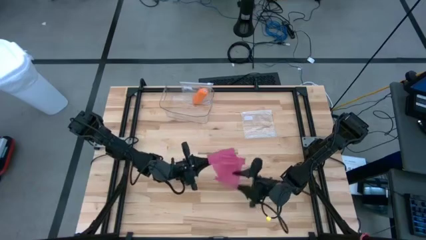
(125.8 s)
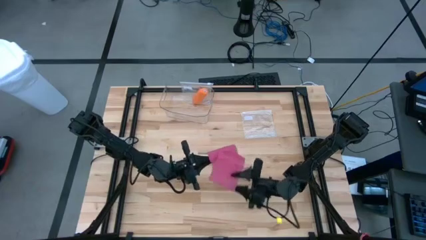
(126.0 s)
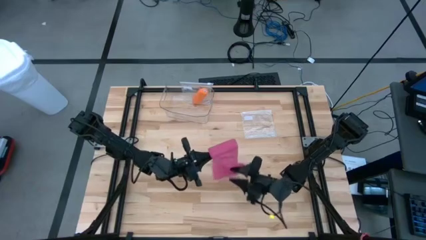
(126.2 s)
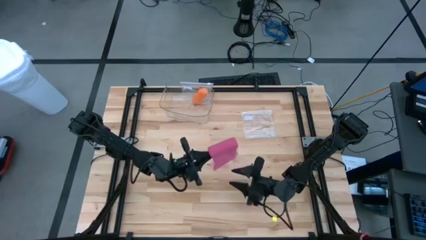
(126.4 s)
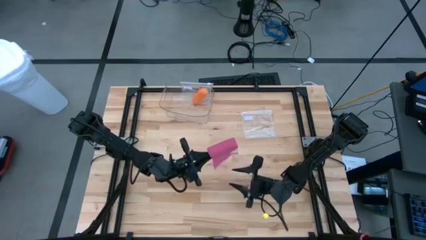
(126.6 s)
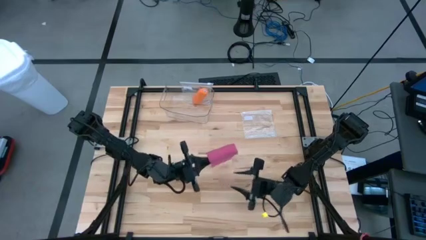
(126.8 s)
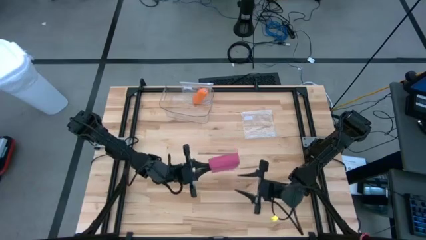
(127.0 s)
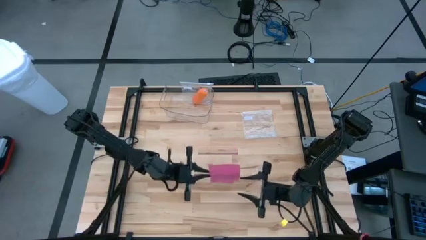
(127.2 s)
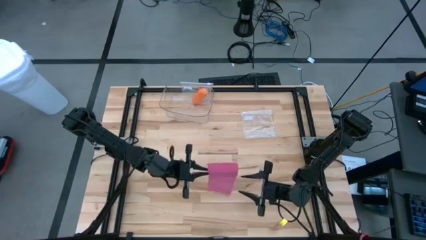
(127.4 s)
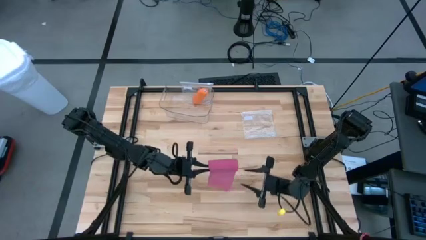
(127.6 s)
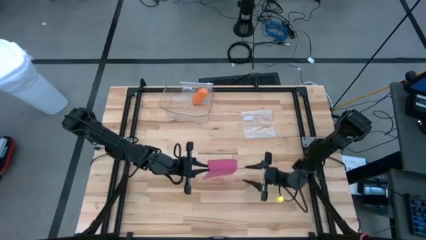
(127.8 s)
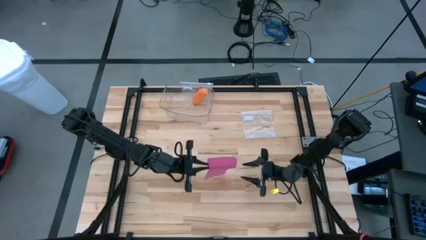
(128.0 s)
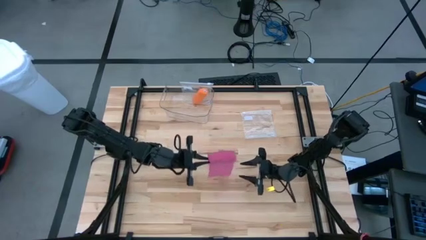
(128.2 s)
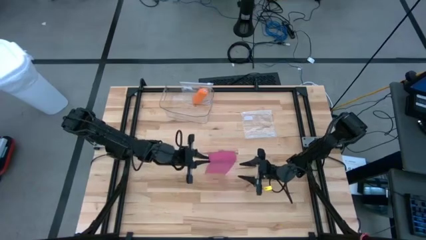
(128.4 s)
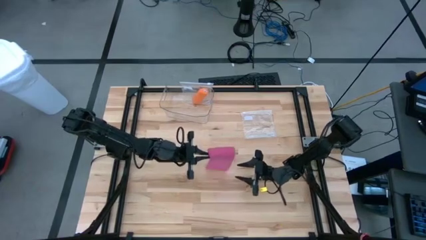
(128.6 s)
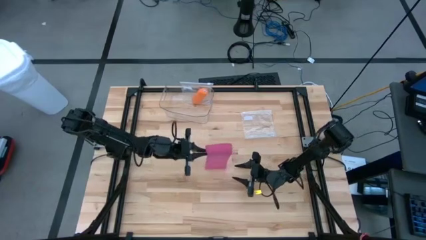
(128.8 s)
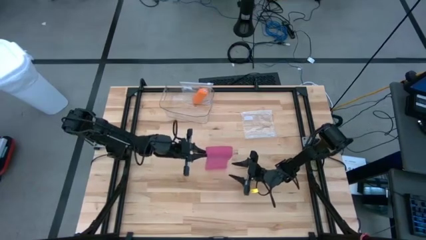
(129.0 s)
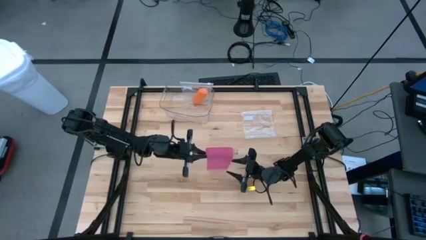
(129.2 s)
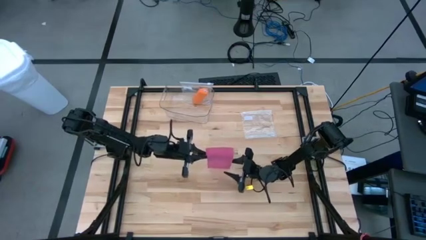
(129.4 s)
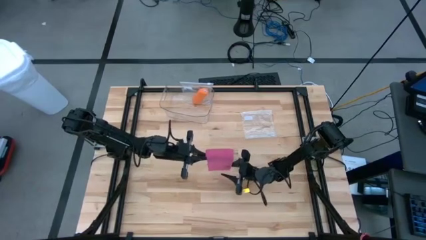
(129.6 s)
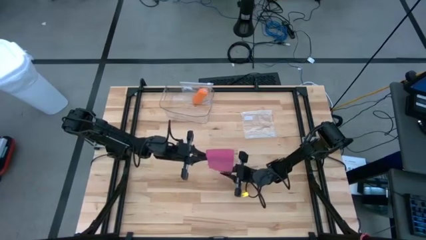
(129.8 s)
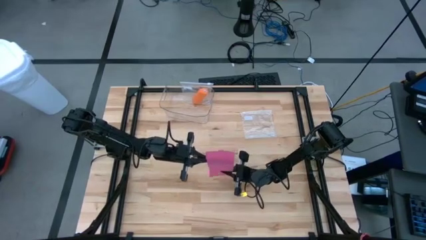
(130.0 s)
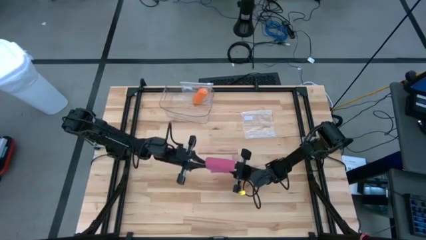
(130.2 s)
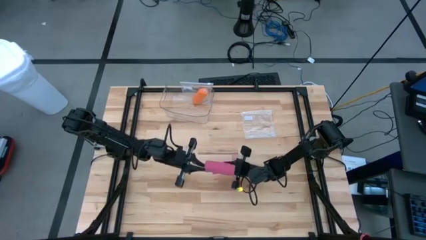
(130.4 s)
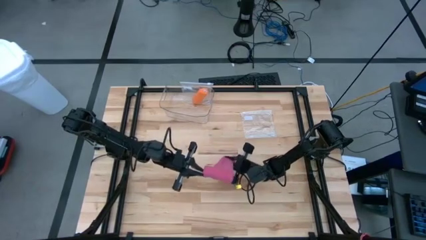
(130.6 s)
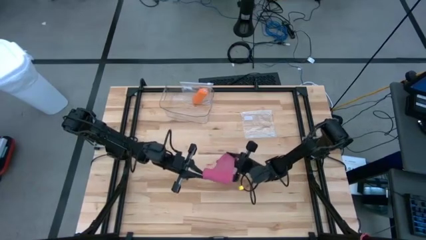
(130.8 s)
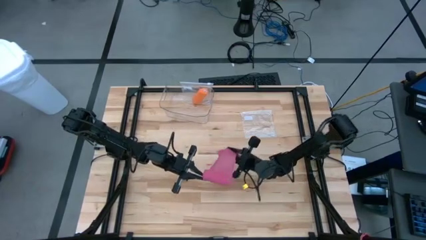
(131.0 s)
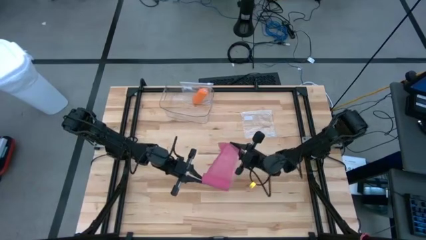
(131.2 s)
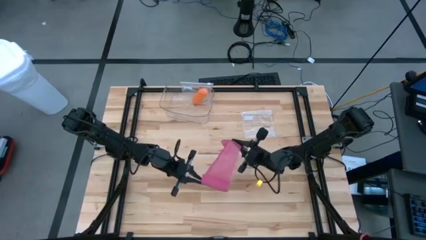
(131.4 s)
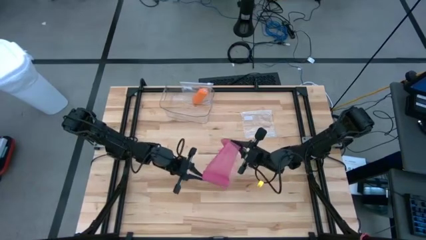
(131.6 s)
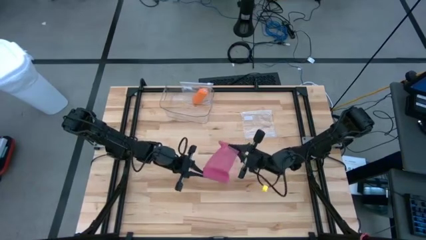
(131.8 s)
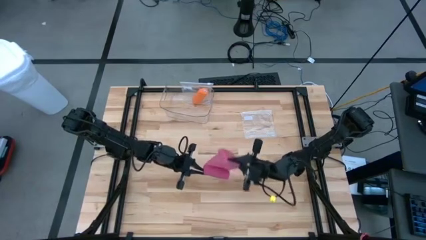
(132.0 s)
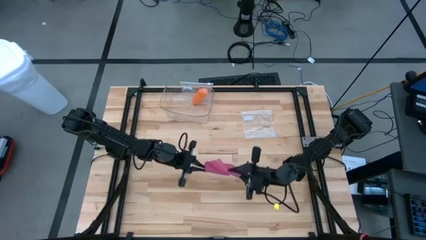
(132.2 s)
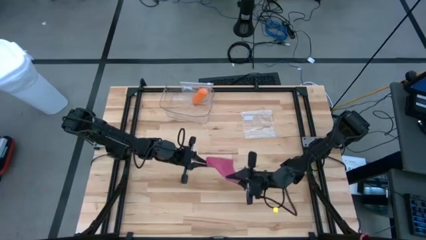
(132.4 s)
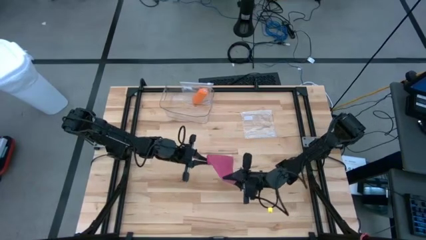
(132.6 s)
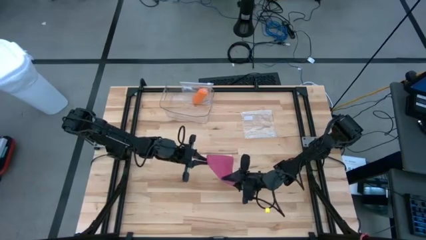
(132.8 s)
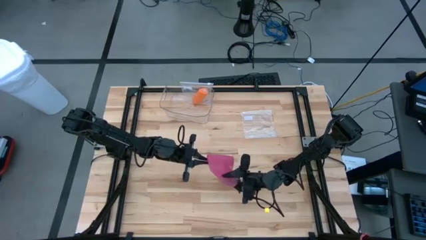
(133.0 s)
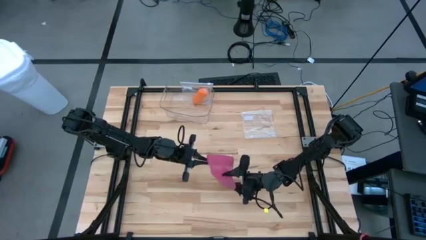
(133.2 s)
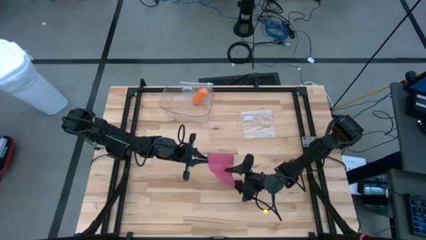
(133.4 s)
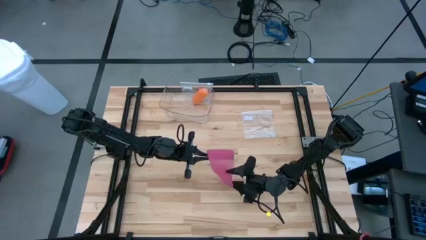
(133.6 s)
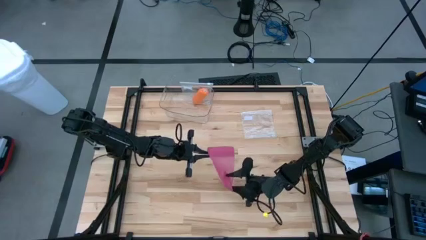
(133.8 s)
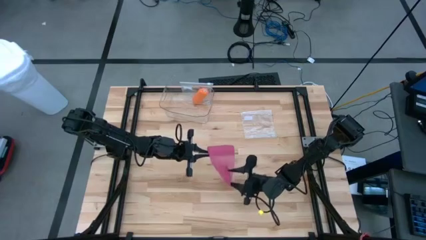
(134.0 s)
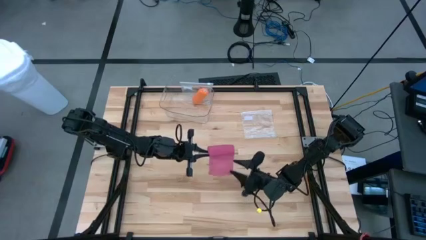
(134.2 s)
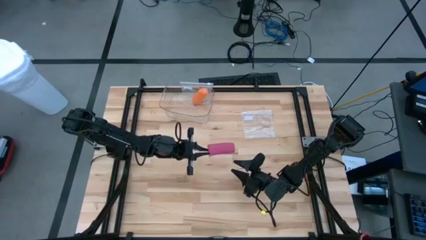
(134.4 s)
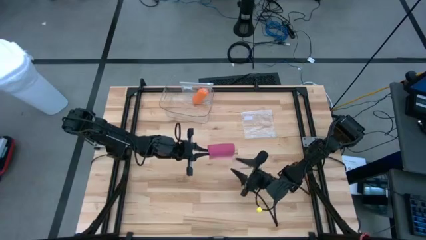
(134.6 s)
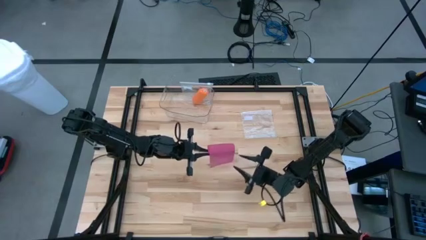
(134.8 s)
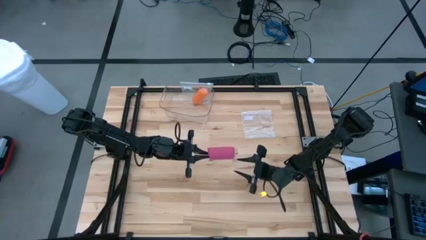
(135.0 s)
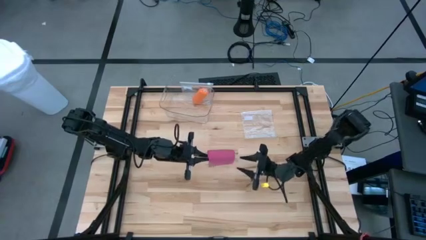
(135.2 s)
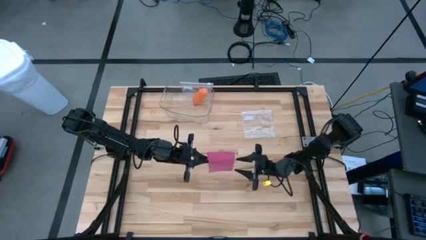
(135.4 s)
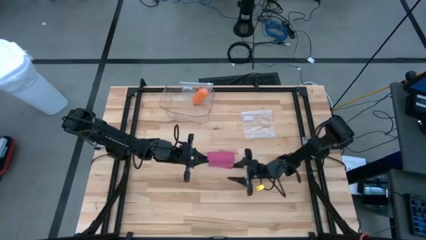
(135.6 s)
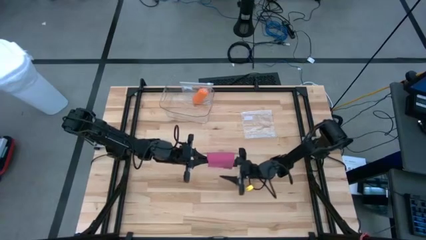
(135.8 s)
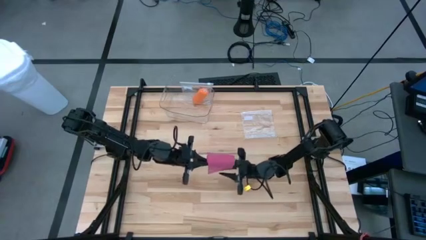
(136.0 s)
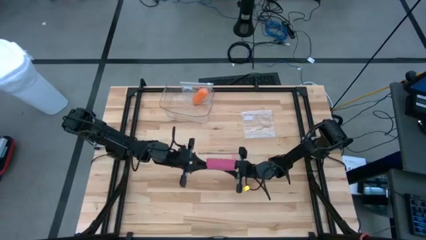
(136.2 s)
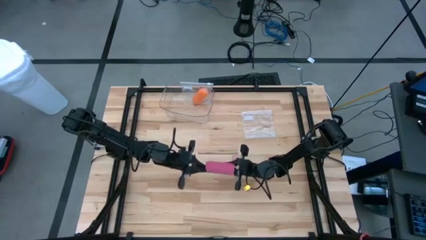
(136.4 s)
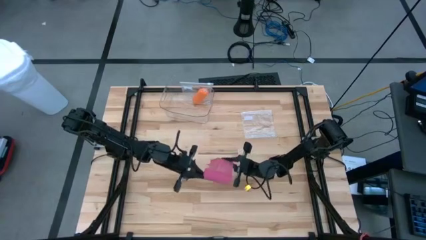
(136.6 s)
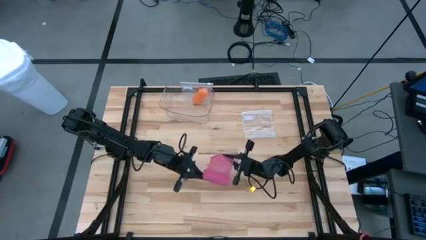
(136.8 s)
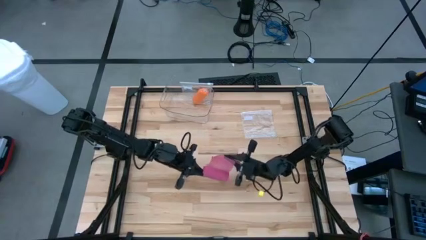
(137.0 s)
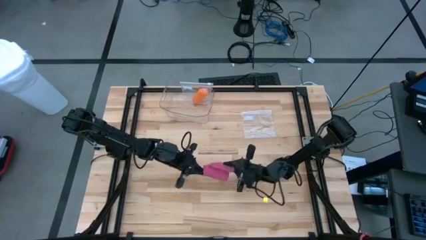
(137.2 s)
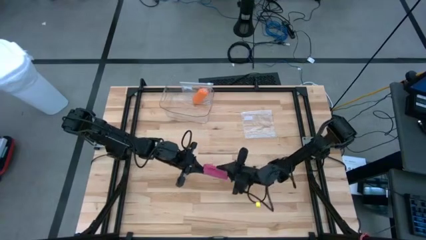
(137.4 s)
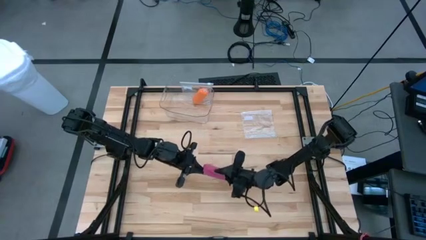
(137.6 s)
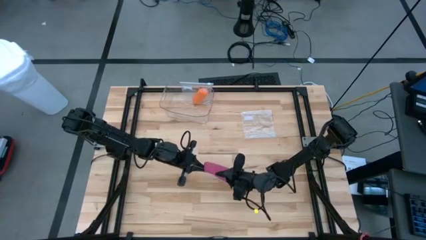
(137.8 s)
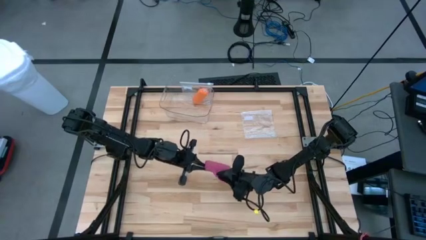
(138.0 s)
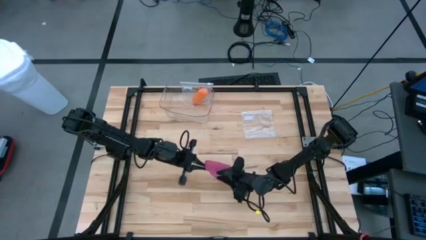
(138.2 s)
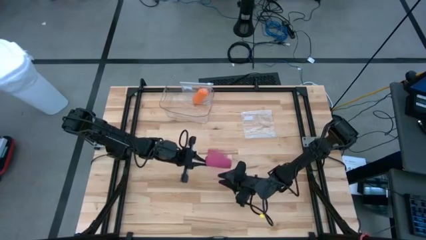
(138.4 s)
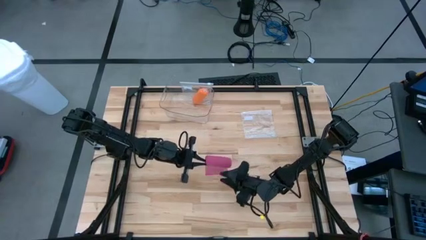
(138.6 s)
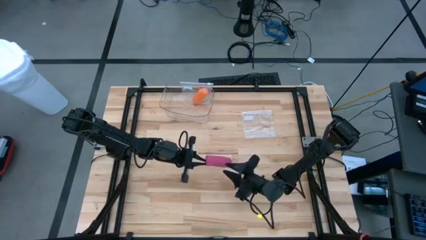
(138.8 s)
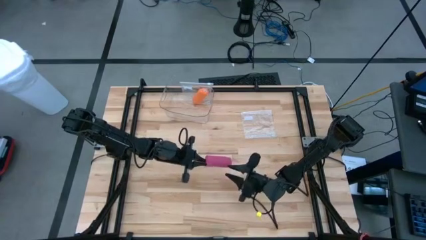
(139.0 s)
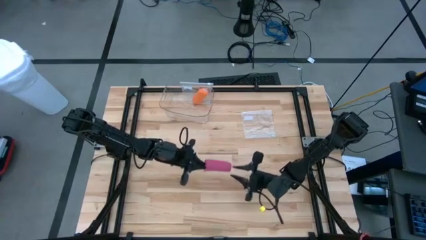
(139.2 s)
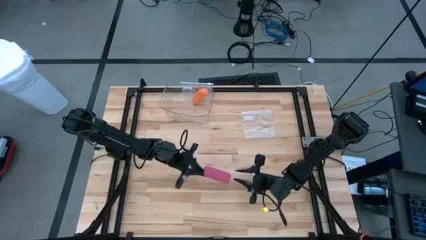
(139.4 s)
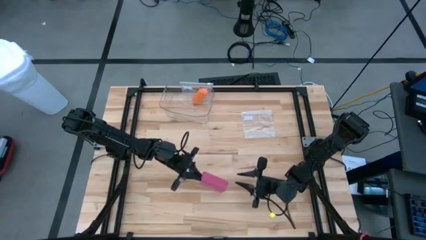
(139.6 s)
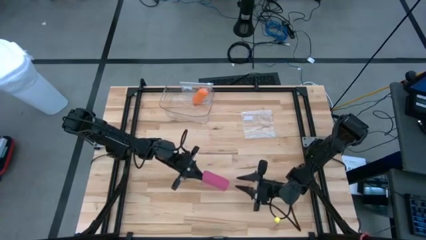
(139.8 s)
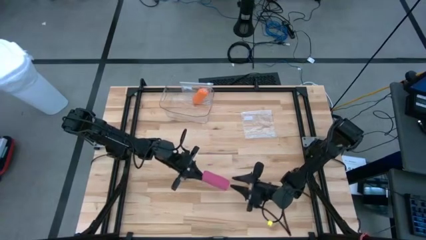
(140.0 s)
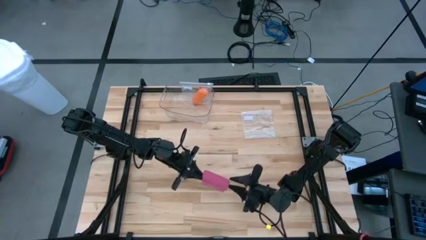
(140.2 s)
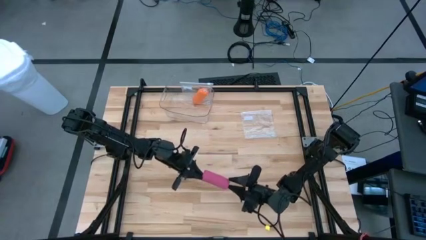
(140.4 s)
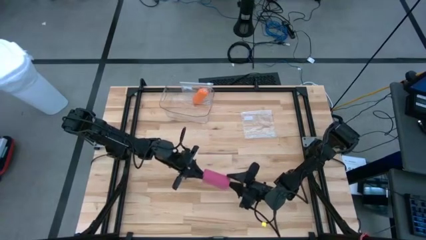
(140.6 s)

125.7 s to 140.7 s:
Task: Roll bandage
Roll the pink bandage
